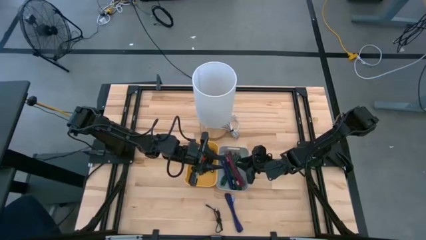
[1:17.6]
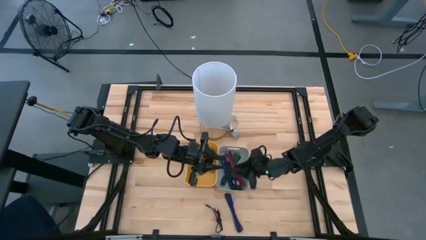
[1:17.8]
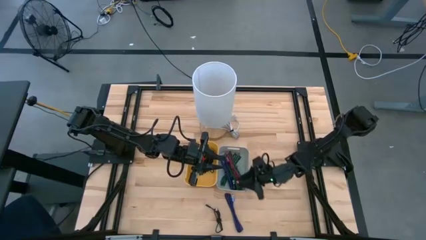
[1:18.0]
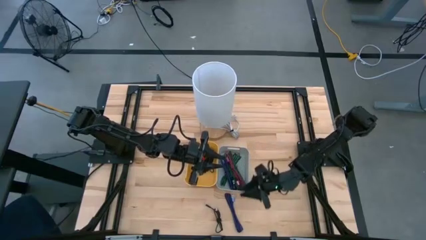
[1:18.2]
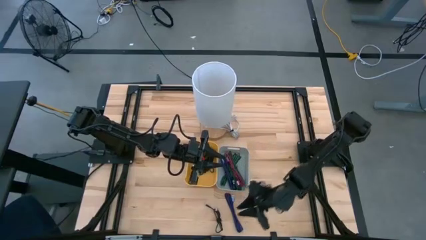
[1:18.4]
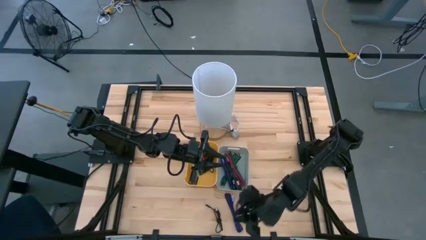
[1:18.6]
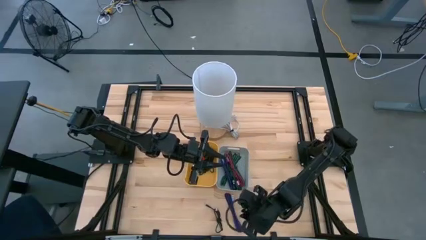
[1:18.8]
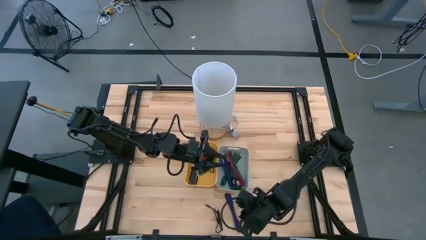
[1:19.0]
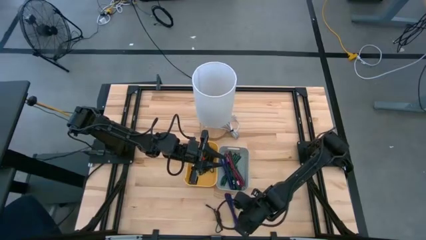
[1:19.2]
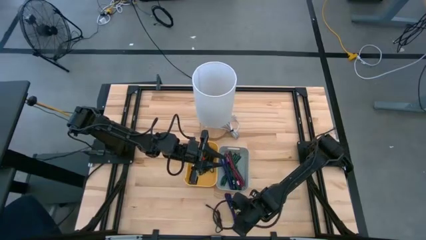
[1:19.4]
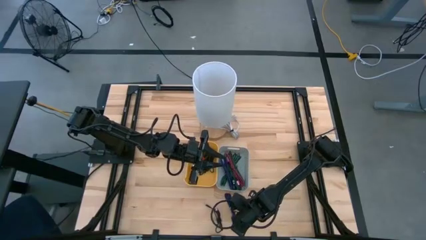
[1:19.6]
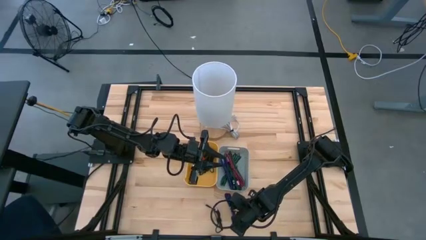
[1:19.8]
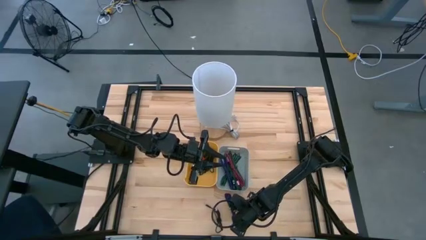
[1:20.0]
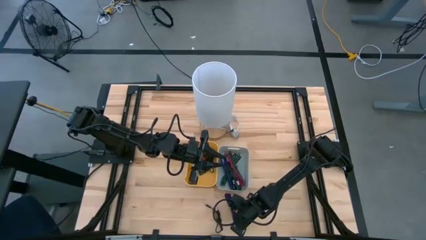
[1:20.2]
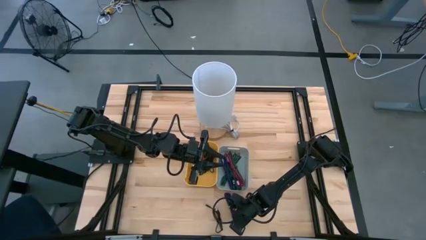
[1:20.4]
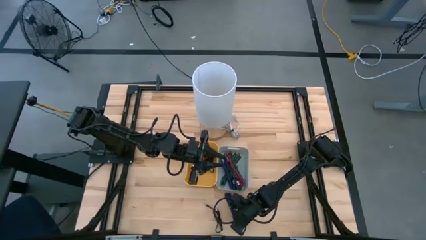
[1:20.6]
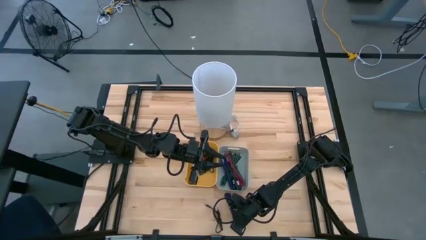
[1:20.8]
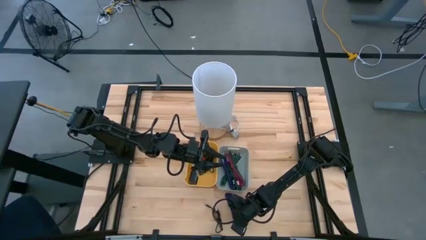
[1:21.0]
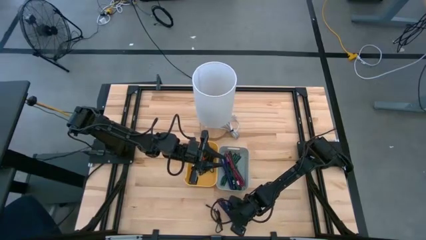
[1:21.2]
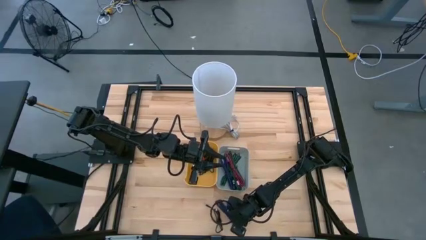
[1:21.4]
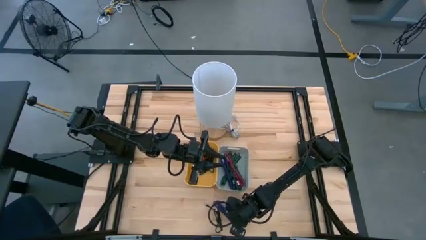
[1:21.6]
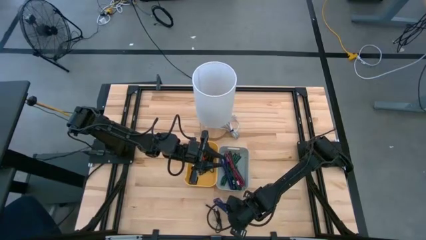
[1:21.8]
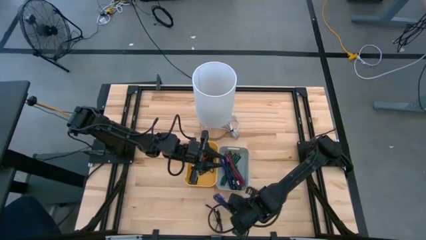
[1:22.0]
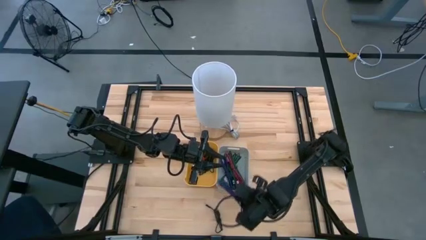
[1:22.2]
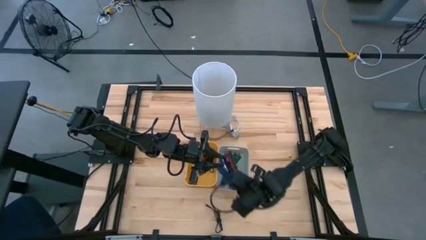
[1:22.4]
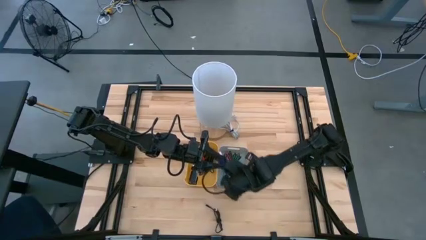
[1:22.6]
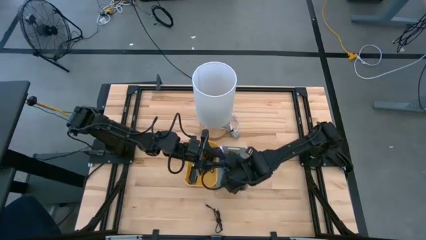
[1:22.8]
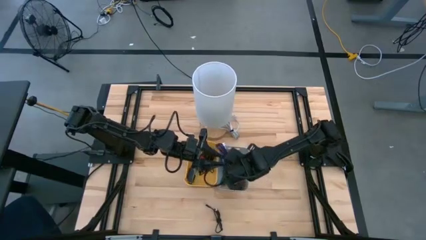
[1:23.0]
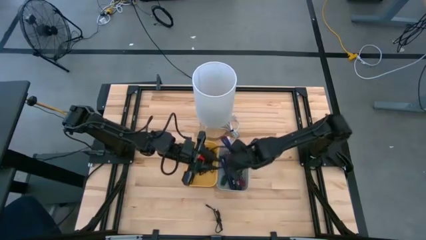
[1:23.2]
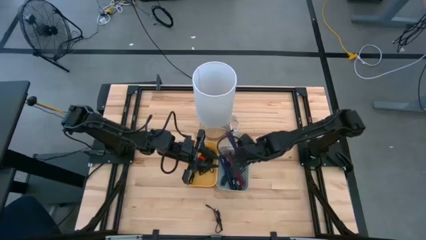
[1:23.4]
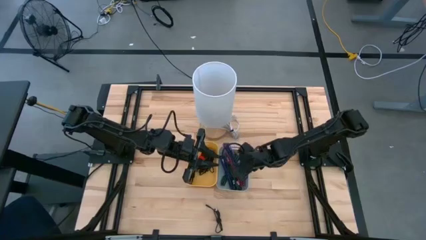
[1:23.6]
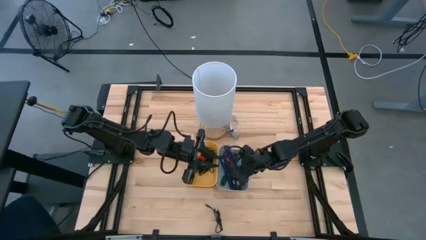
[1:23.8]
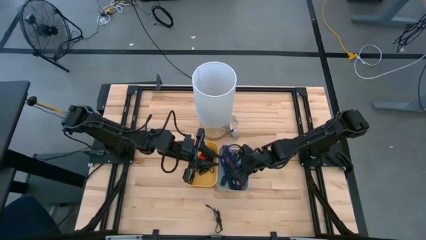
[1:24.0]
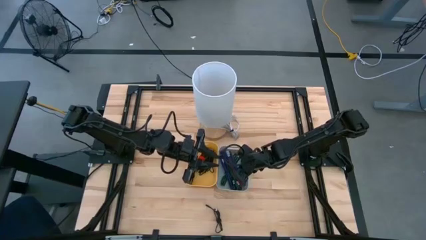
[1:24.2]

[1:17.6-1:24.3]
Task: Pick & Place USB Port
Put the violet and white charger cable into the gray bin

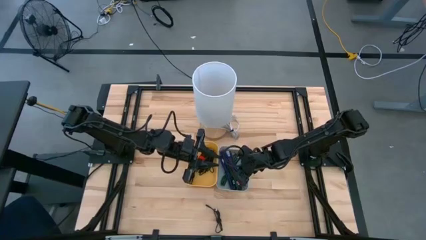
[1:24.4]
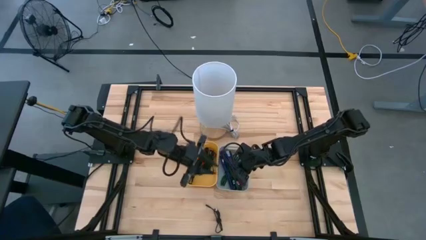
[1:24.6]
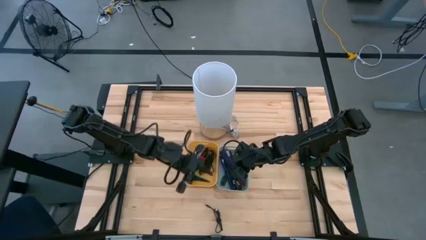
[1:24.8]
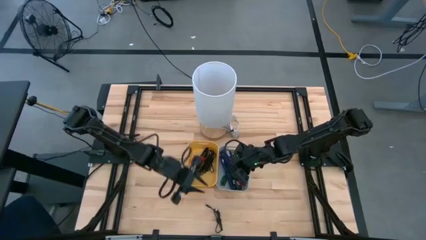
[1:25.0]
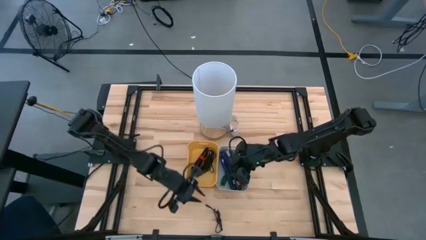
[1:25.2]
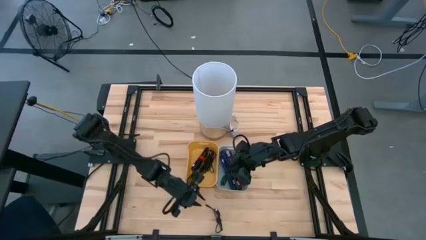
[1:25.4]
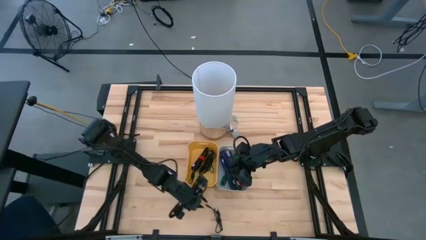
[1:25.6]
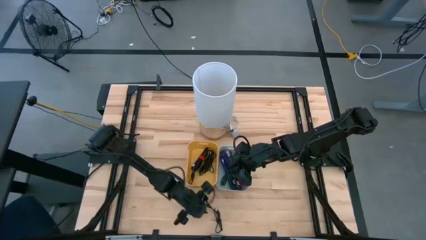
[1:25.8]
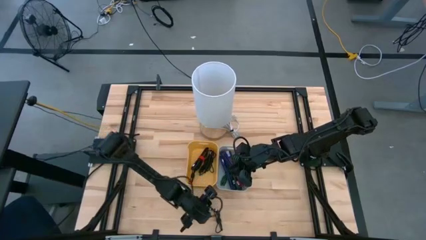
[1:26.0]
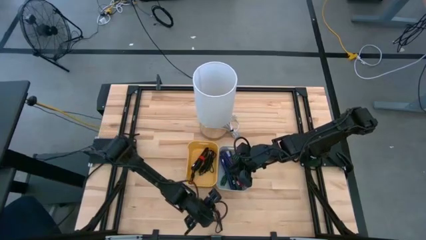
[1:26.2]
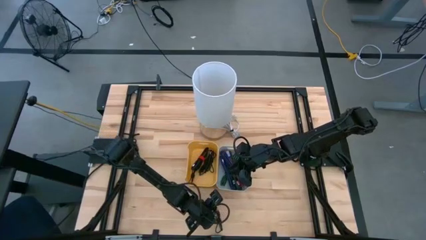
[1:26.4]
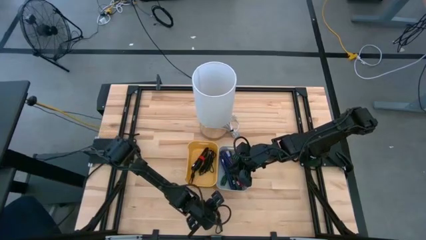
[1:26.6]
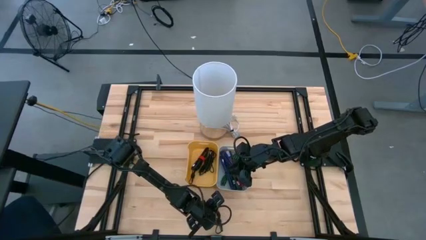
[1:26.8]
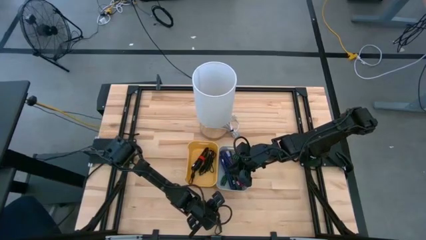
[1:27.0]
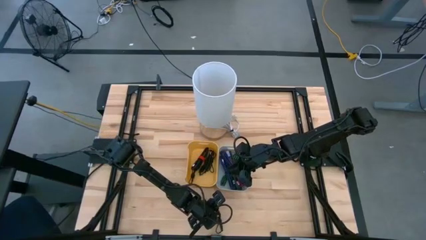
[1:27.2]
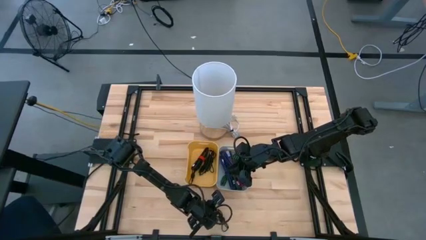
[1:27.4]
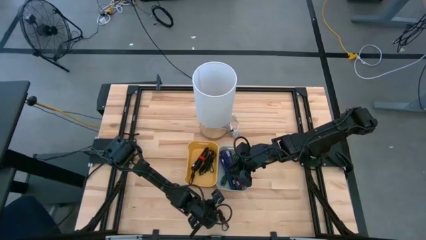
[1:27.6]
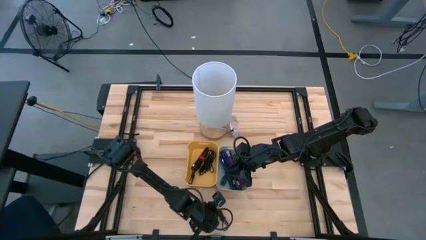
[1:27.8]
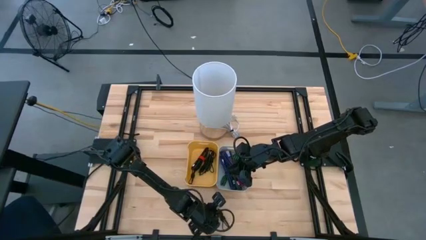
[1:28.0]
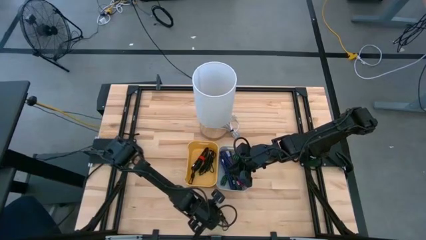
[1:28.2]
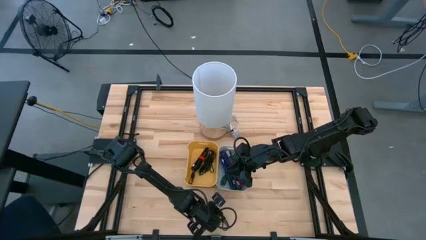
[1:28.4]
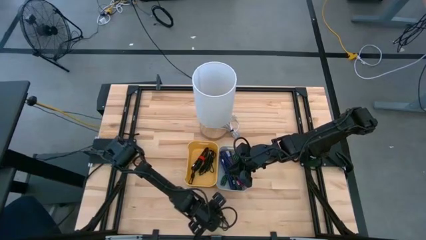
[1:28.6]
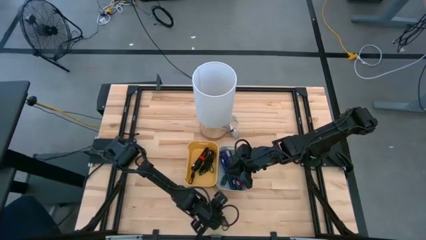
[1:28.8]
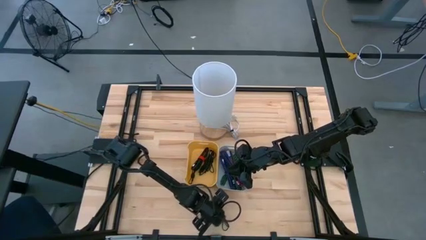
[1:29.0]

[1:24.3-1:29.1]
Put the black charger cable into the yellow bin

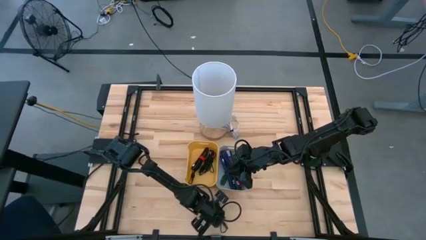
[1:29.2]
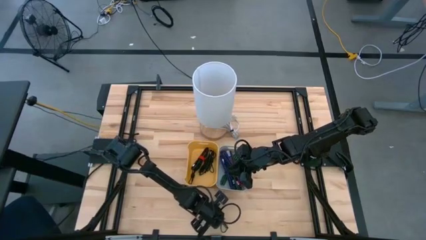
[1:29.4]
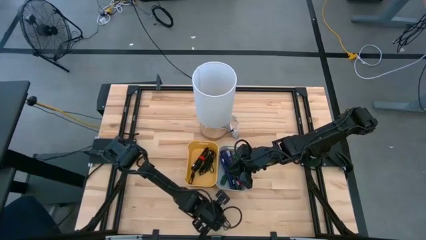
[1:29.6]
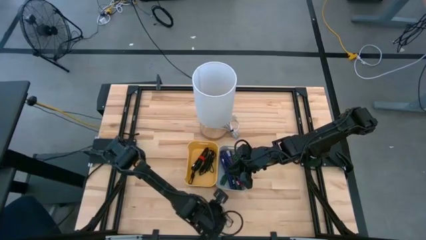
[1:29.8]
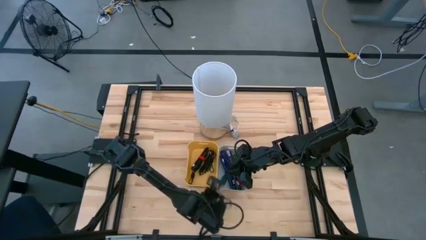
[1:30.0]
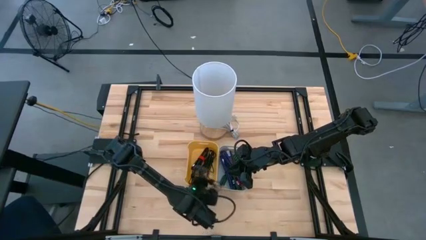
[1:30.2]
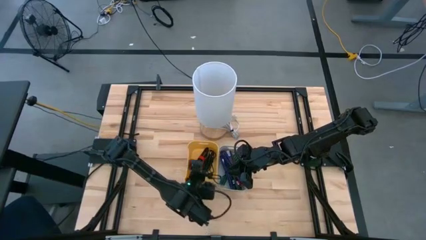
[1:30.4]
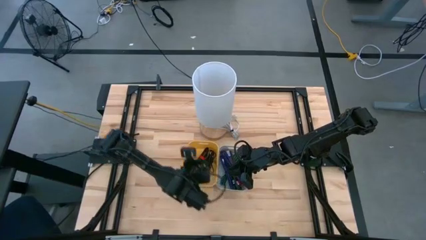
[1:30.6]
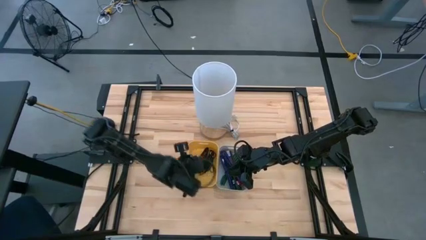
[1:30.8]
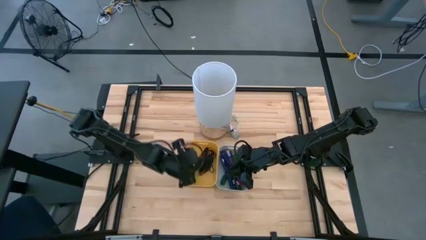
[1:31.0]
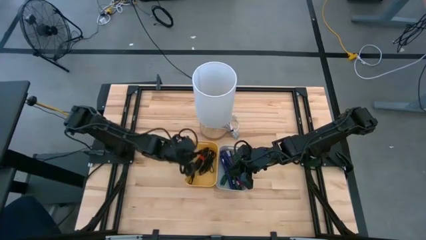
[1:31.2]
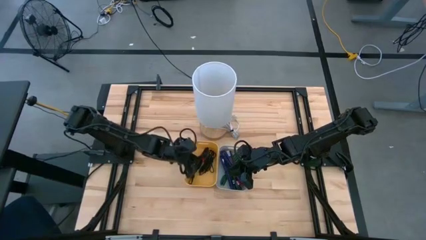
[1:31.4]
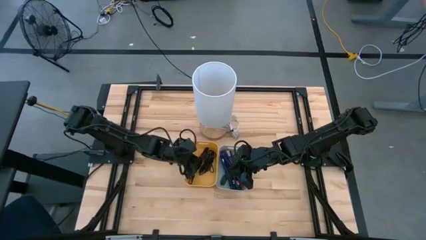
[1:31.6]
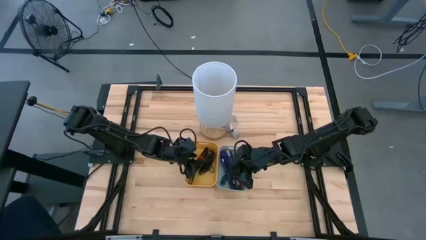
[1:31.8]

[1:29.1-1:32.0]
Put the black charger cable into the yellow bin
